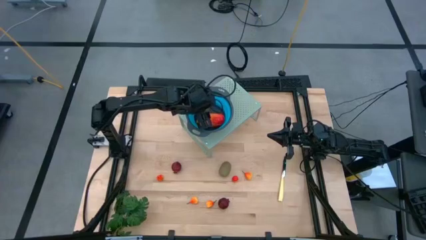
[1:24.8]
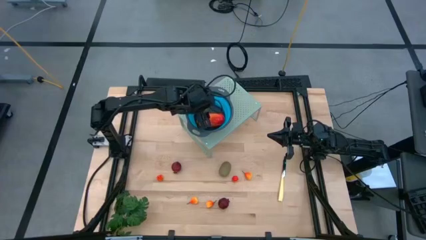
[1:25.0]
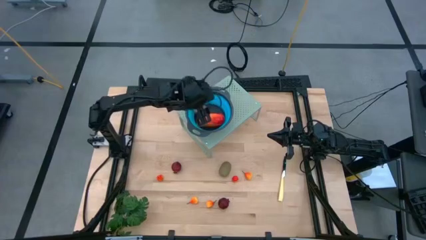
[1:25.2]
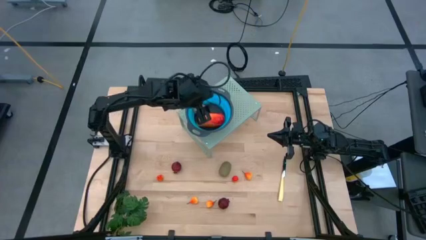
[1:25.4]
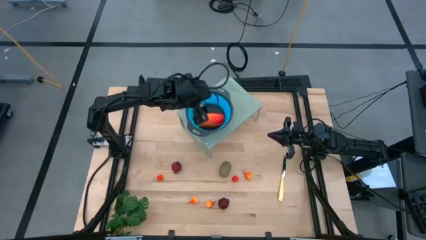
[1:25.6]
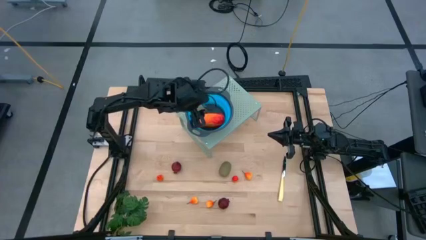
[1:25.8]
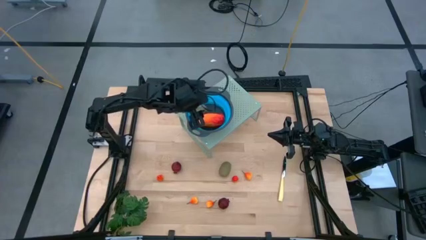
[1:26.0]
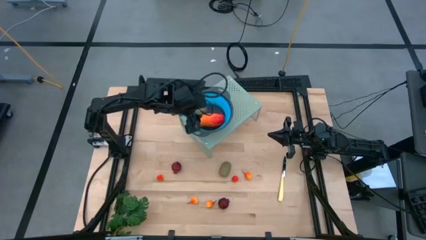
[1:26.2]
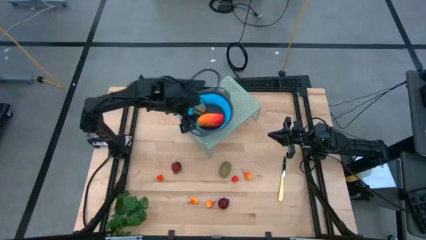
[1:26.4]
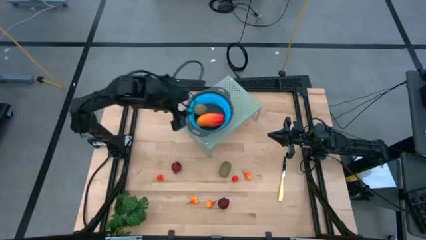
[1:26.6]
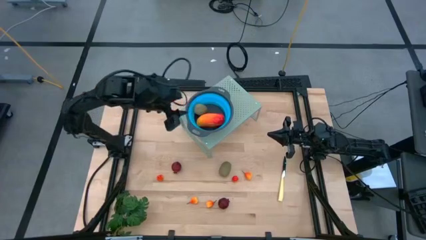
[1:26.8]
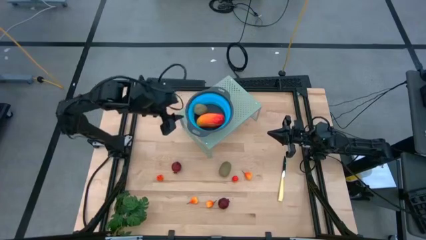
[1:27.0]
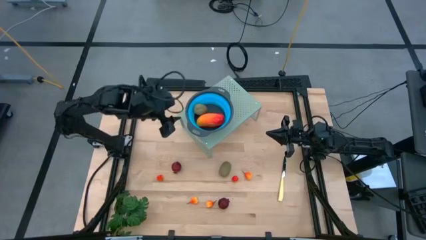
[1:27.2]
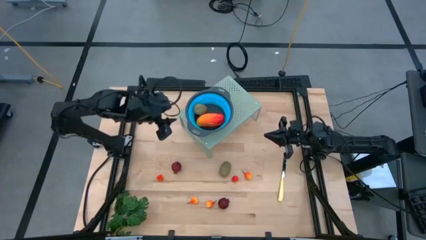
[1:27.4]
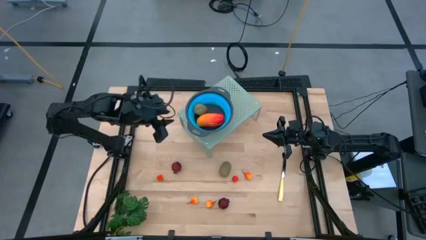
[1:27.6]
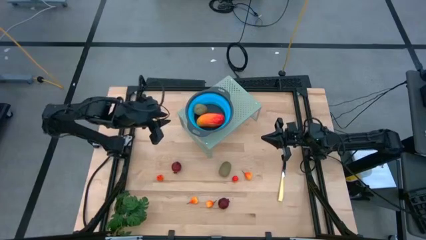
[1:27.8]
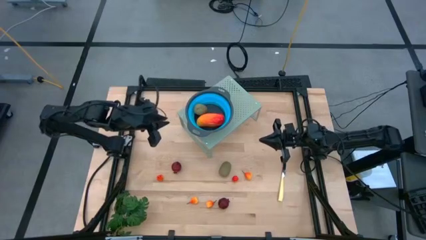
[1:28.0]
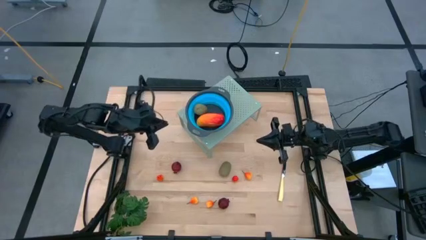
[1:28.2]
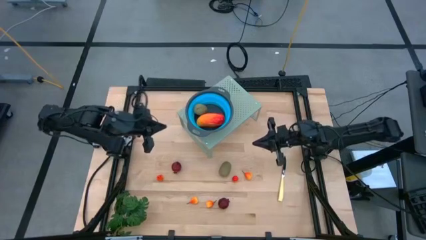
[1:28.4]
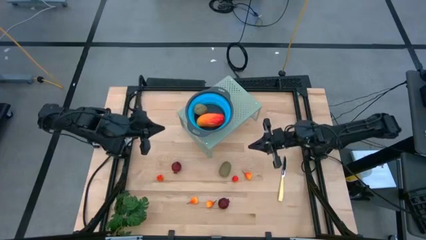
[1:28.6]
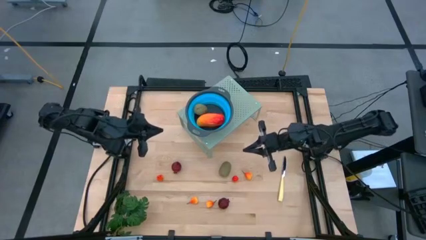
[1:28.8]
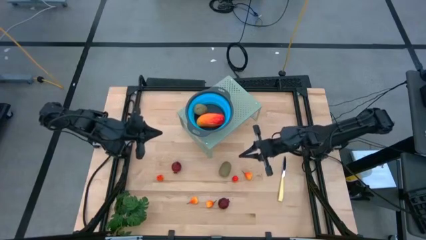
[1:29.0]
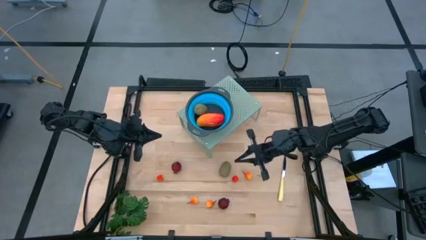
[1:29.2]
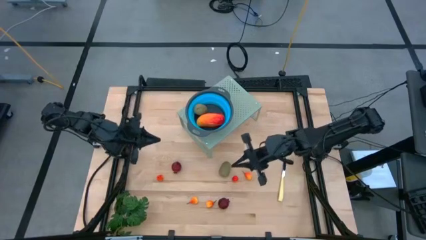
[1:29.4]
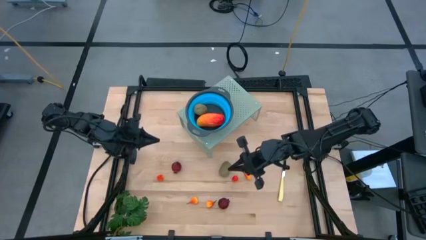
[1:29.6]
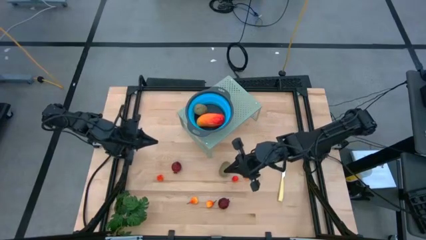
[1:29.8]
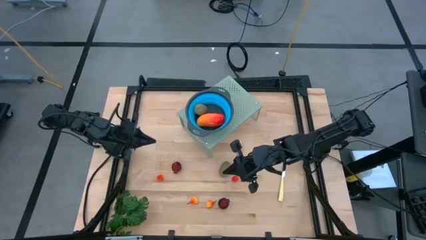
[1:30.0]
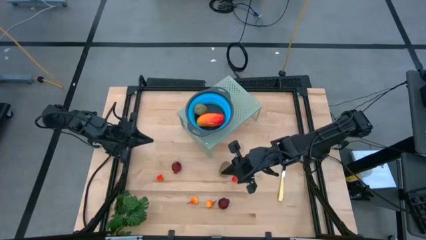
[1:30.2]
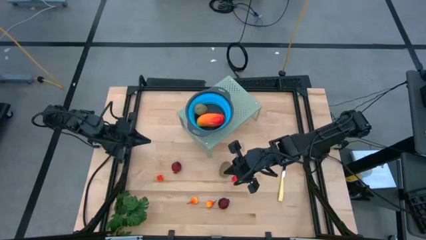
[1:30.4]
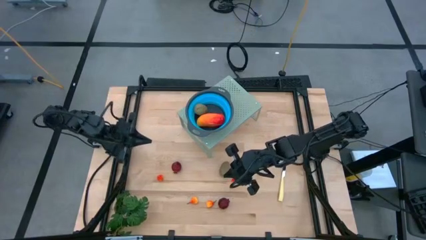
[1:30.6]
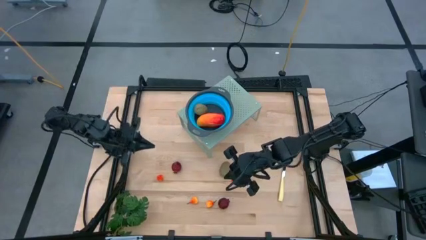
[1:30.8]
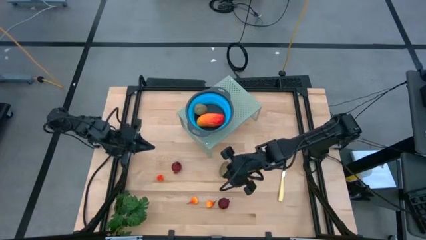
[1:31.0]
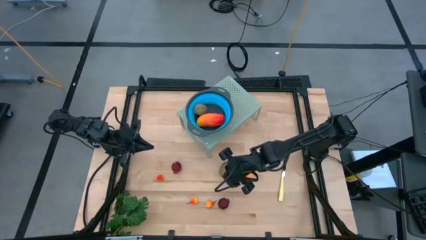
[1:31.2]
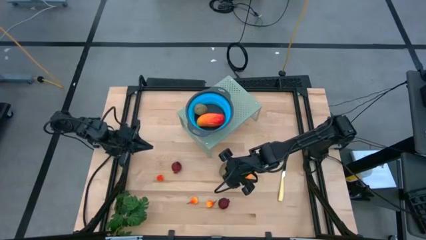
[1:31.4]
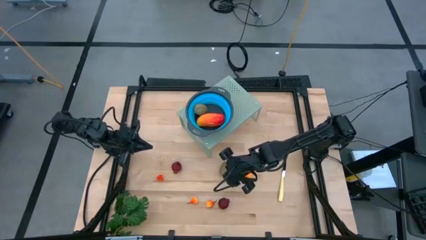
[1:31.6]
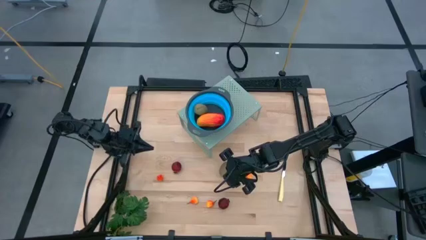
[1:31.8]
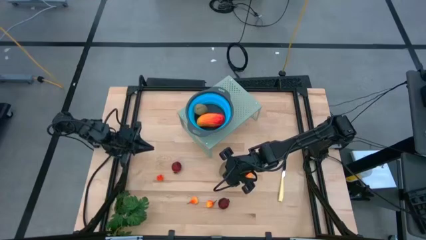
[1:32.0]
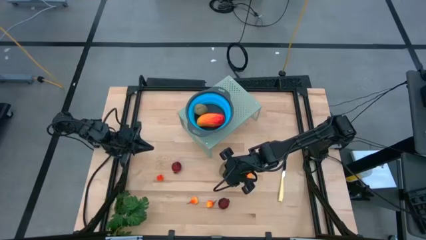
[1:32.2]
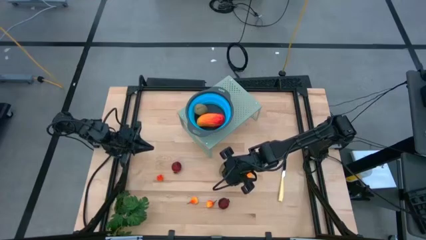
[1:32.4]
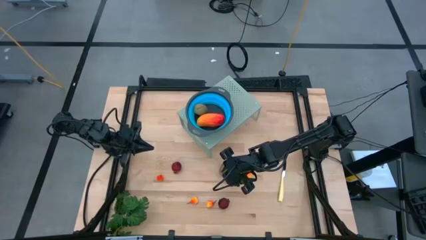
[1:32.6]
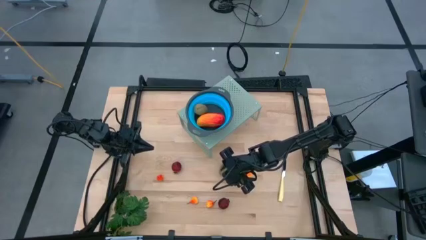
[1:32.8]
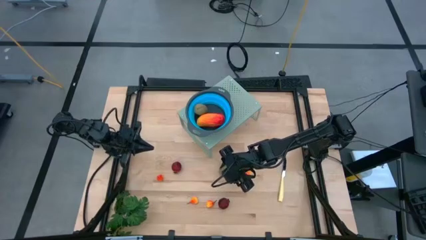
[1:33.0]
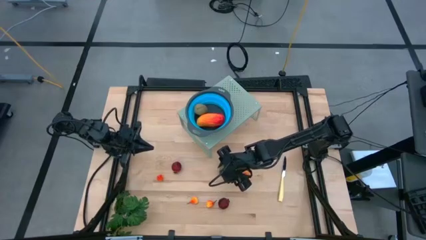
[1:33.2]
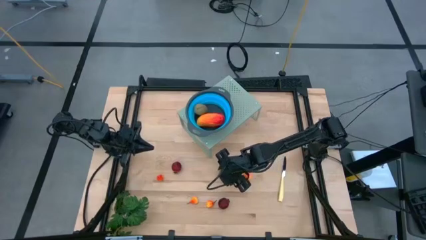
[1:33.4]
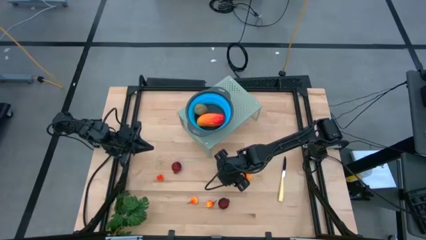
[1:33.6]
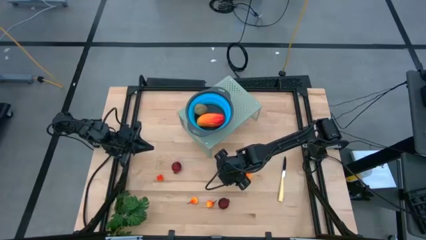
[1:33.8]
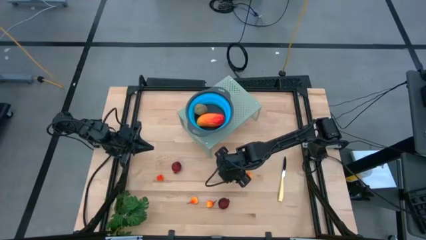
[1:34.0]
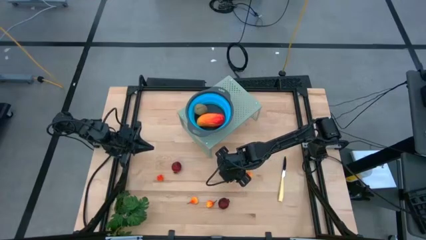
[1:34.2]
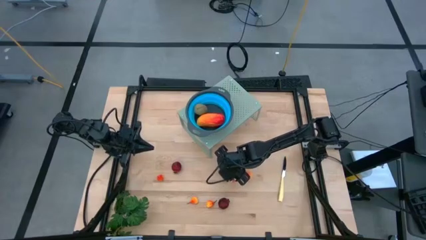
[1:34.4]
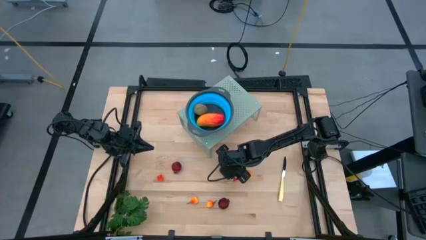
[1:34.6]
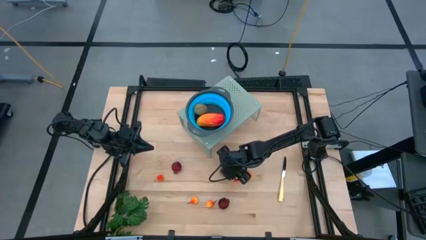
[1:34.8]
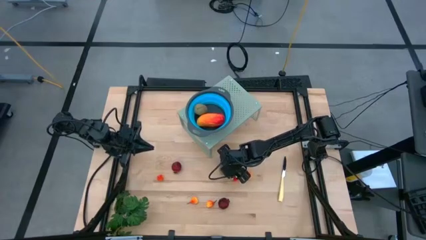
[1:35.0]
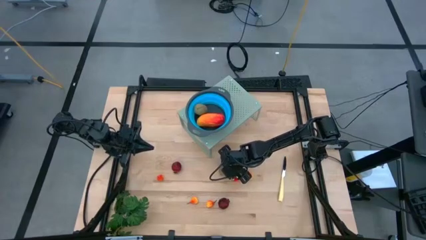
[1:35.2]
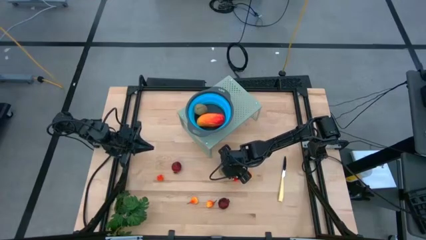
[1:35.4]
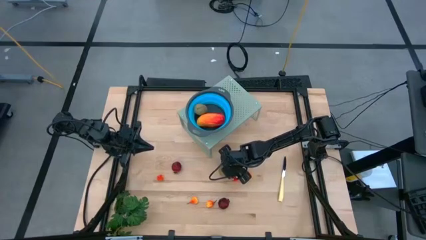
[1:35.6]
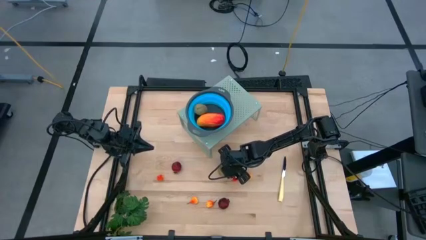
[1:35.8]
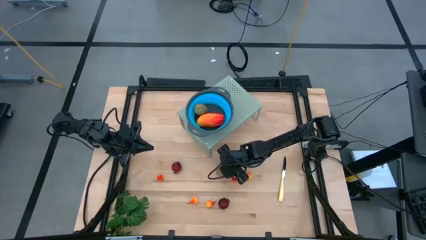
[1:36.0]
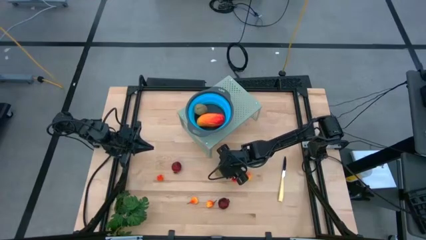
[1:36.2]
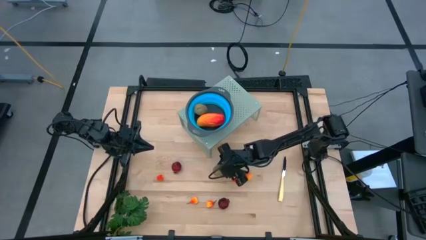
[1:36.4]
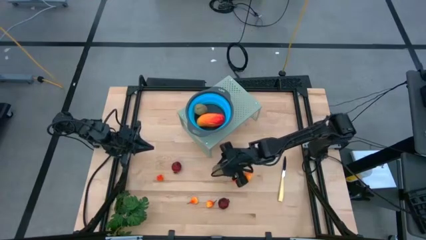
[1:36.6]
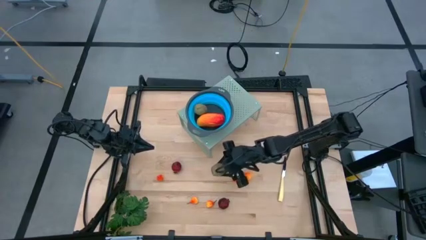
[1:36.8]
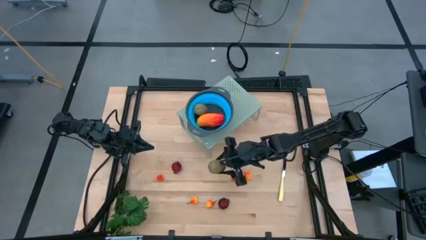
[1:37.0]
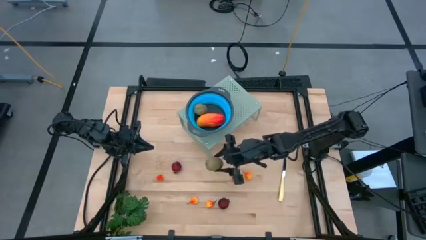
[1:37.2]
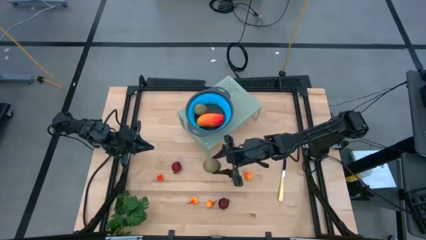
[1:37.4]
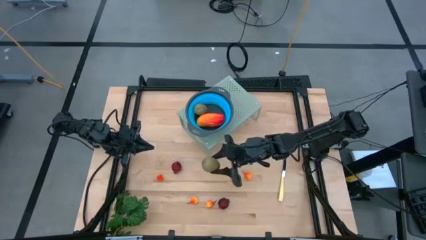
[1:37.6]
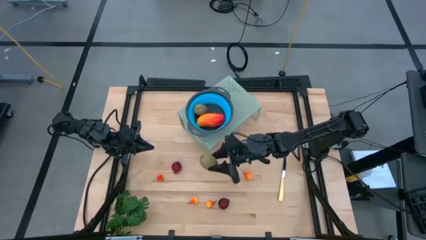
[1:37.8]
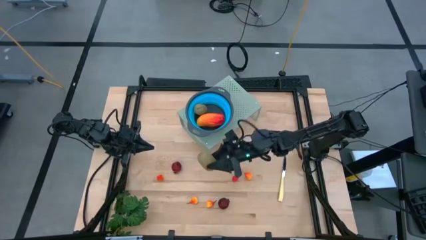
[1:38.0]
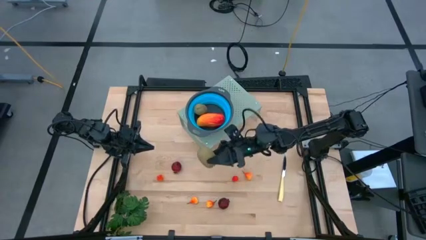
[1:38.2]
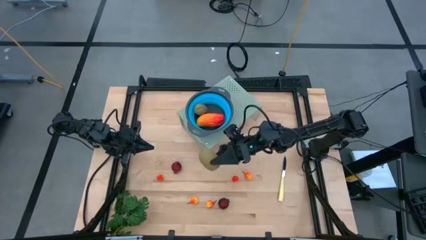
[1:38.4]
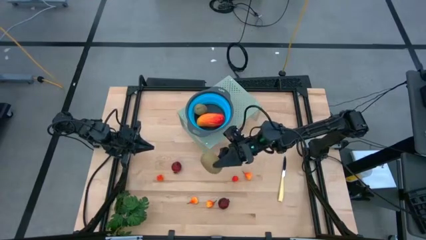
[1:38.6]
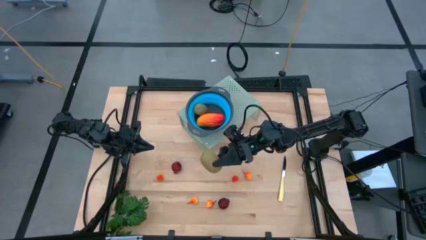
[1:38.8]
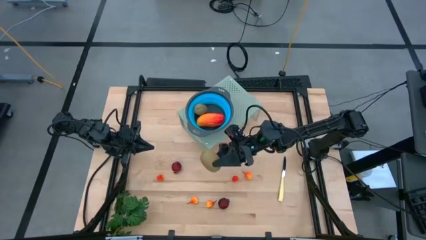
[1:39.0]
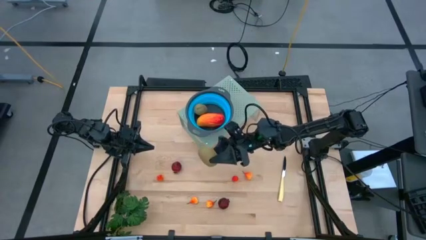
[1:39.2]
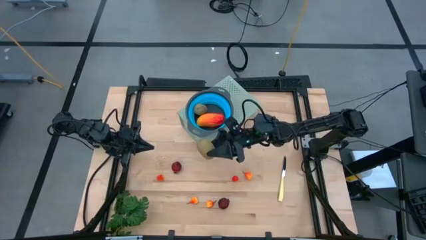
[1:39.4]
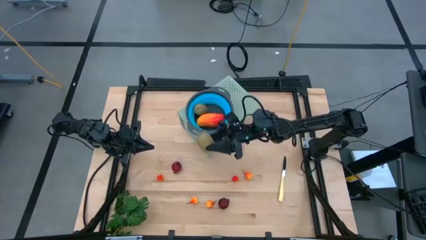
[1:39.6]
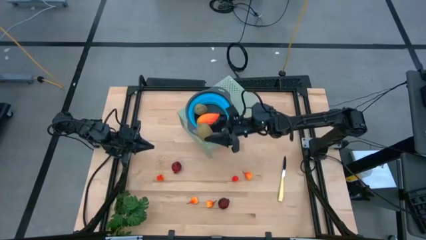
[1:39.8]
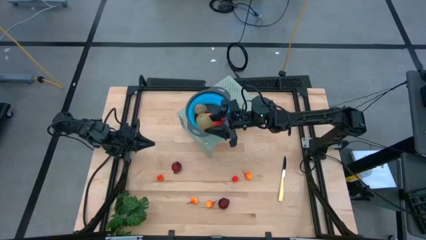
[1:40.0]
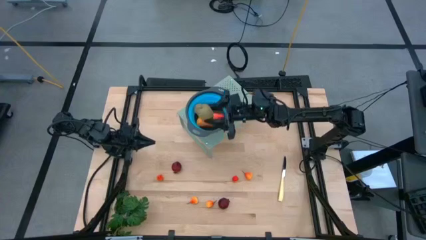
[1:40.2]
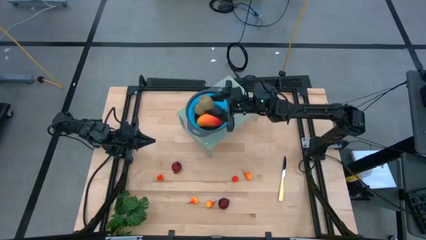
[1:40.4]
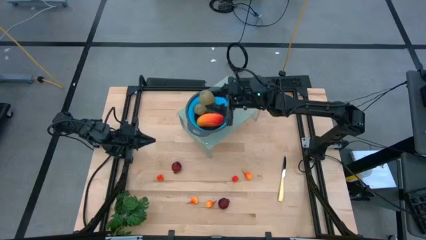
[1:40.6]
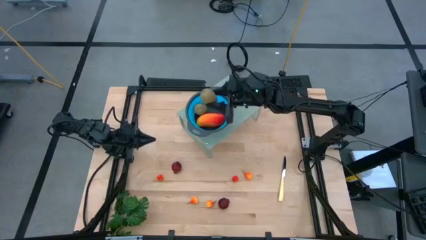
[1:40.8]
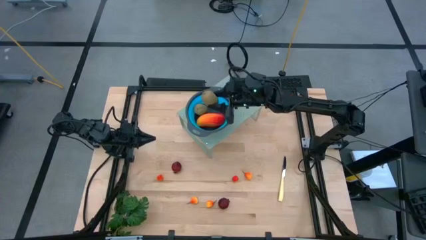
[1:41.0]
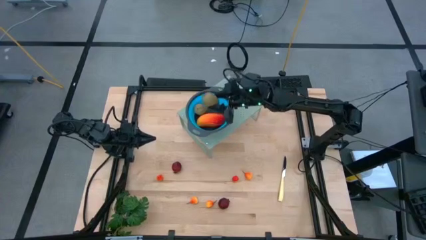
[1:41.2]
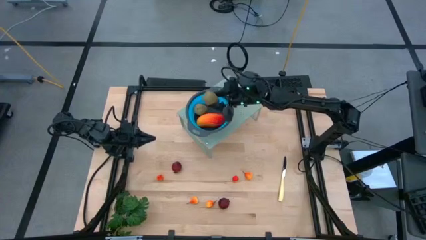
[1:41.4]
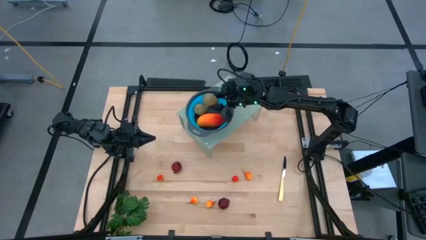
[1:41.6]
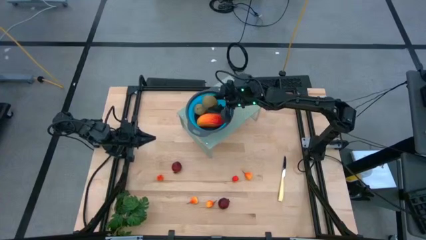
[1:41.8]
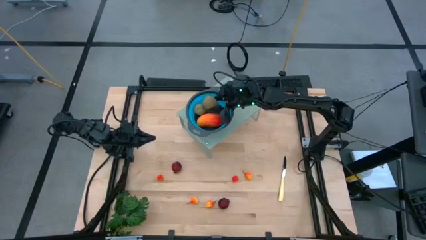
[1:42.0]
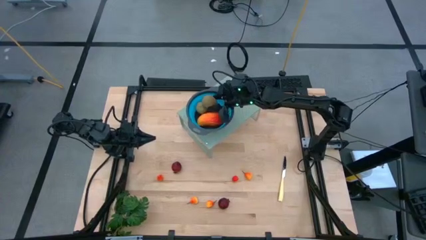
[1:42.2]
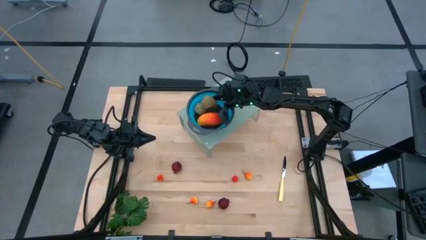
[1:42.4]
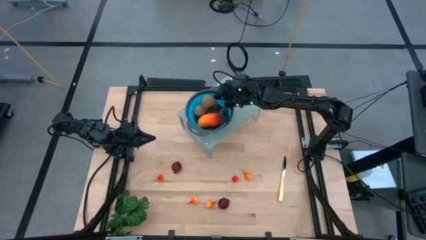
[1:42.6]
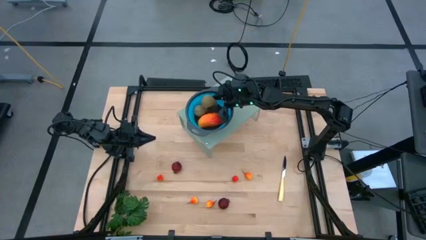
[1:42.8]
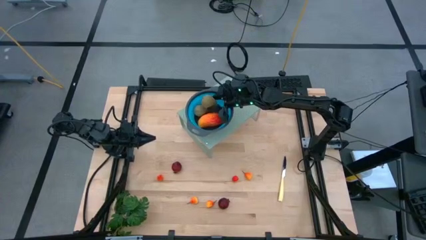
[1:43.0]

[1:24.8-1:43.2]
Task: Pick & Place Fruit
Put the brown kiwi into the blue strainer bowl on the shelf
